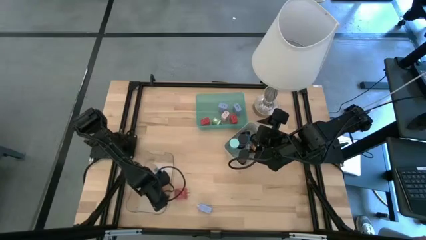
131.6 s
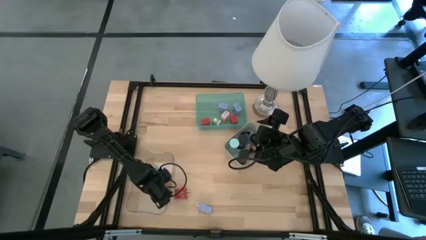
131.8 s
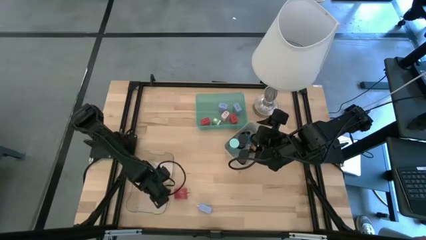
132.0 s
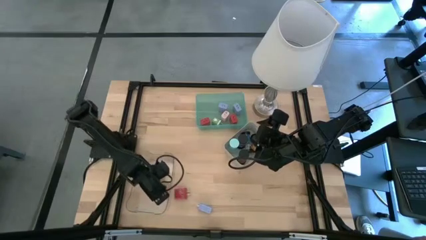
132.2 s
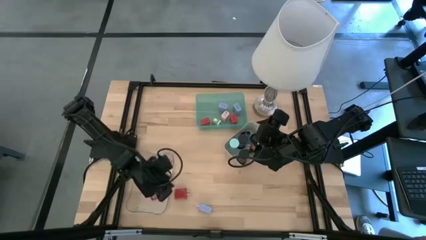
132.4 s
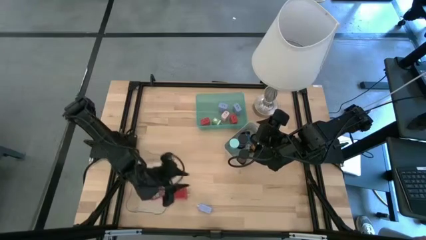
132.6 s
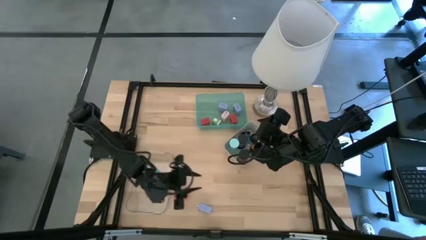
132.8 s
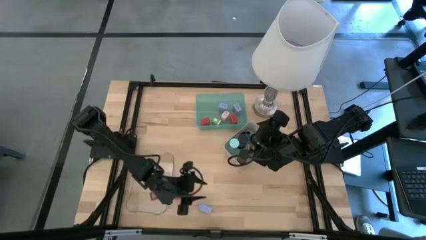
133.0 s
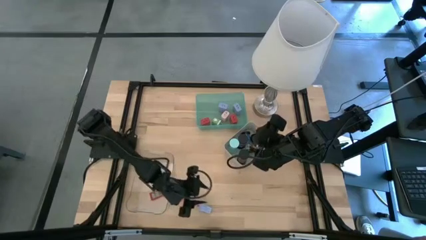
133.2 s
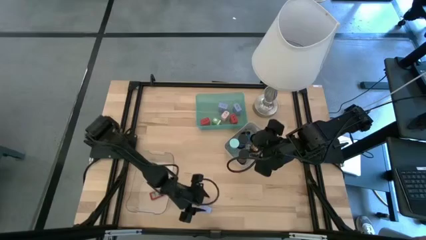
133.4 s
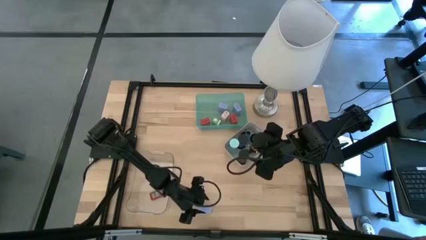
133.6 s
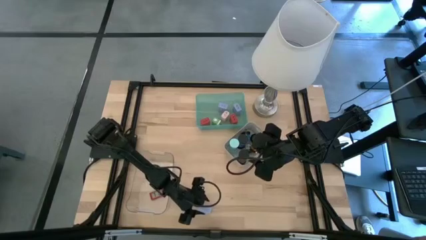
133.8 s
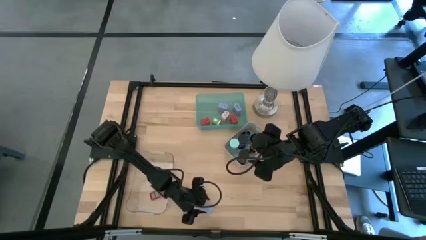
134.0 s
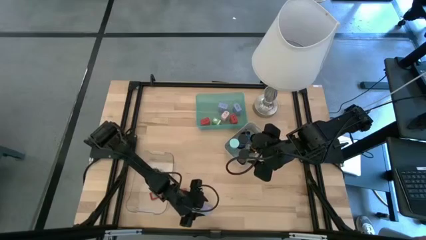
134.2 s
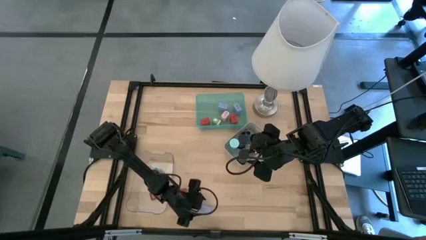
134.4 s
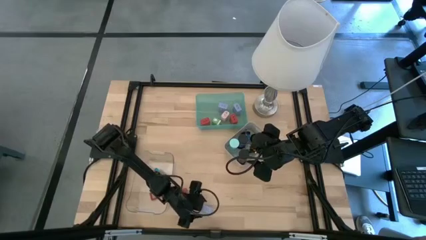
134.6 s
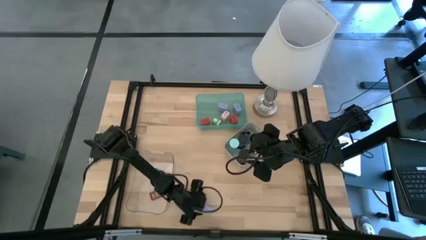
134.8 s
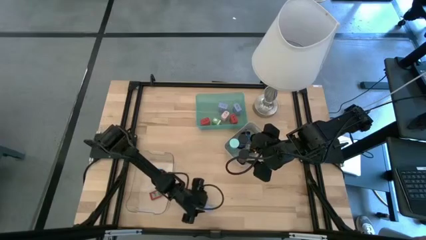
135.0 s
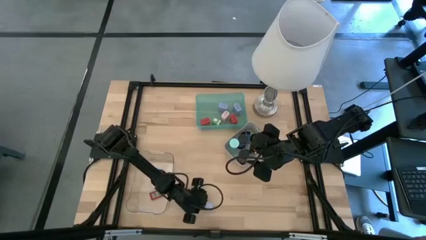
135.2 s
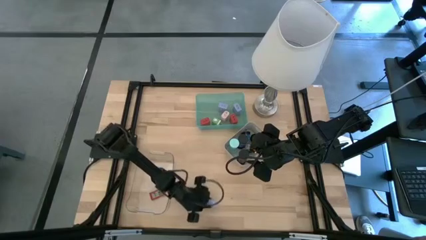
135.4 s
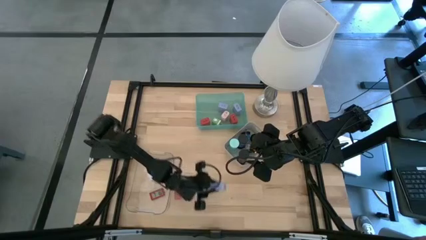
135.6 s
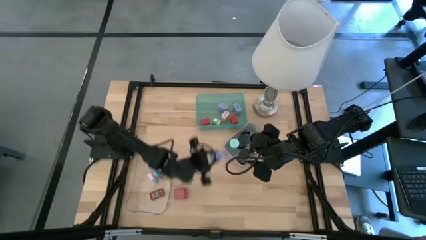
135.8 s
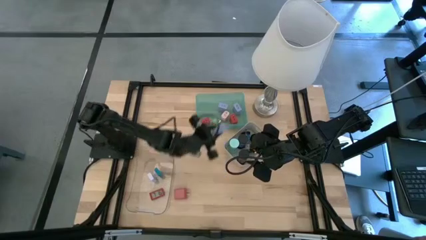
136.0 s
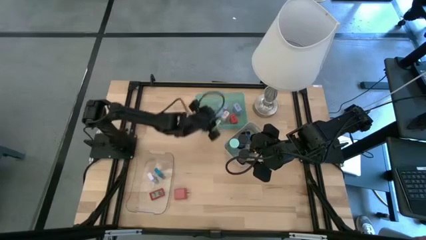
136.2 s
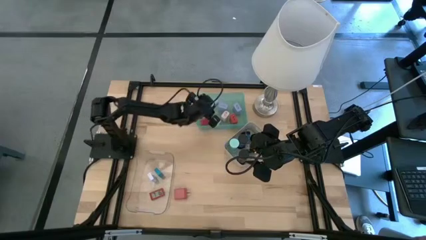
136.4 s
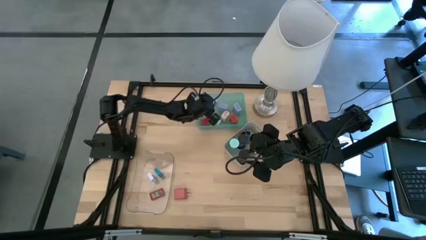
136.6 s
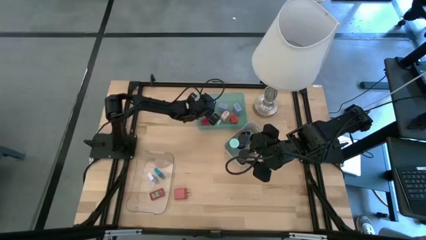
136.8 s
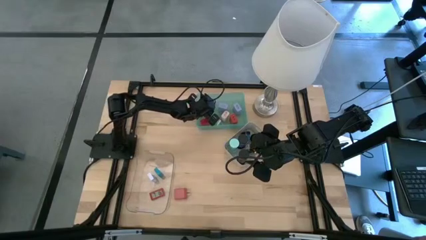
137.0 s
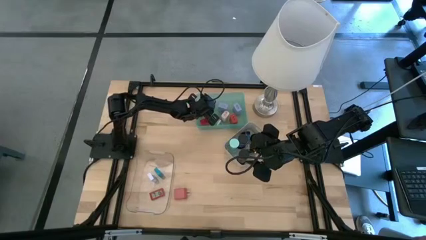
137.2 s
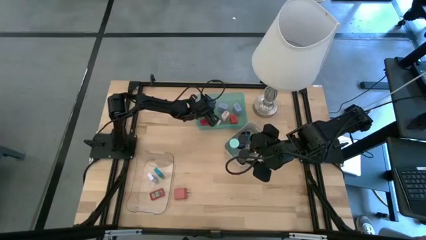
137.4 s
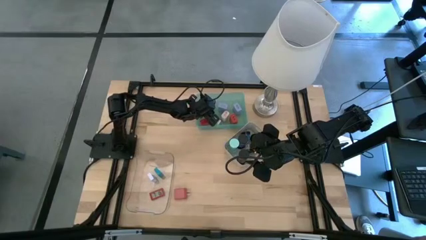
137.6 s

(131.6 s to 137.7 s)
Task: Pick & Place Office items
Put the light violet charger adapter into the green bin

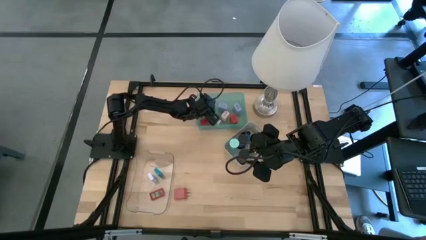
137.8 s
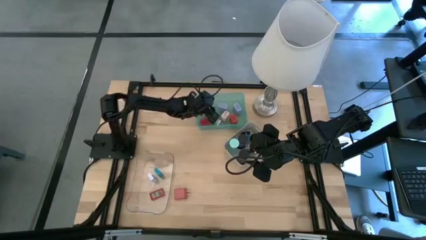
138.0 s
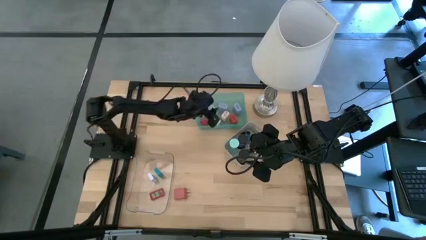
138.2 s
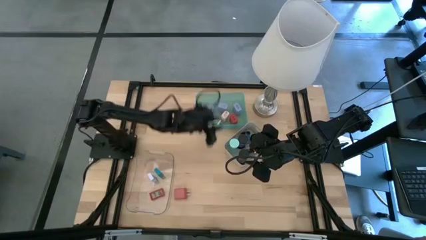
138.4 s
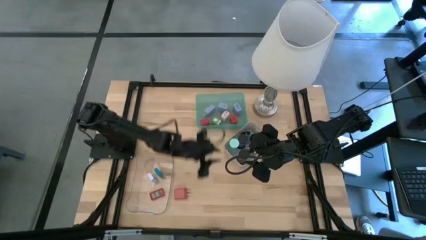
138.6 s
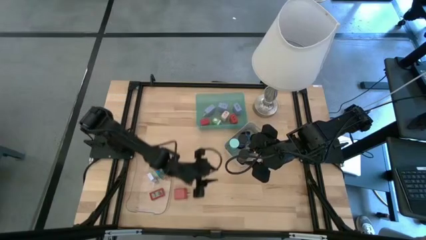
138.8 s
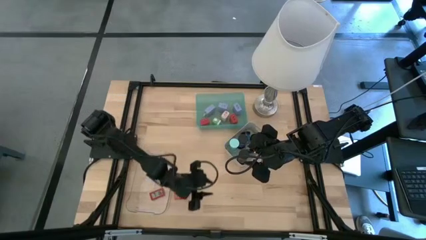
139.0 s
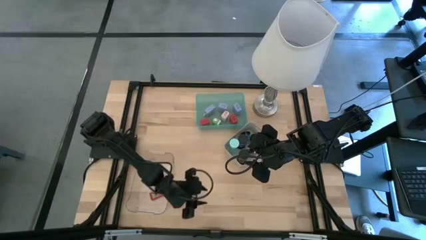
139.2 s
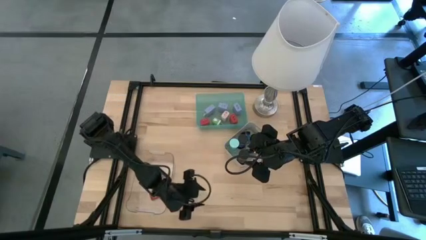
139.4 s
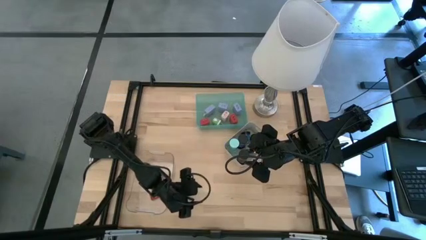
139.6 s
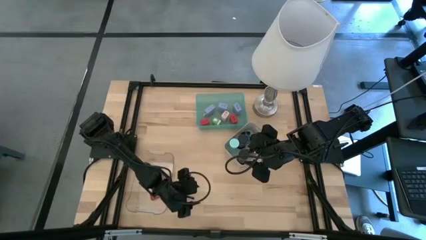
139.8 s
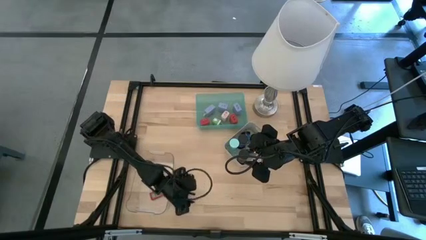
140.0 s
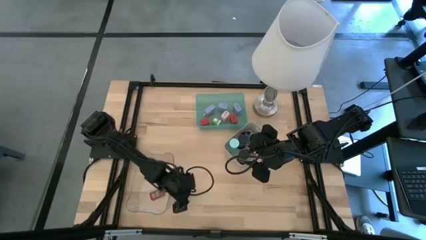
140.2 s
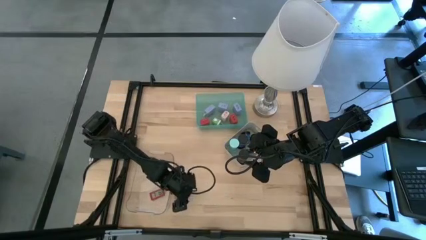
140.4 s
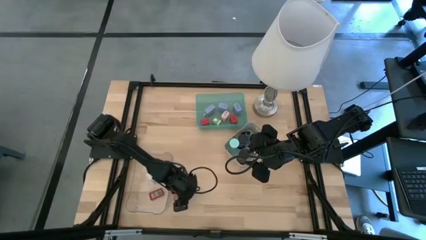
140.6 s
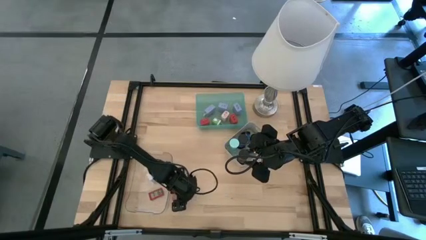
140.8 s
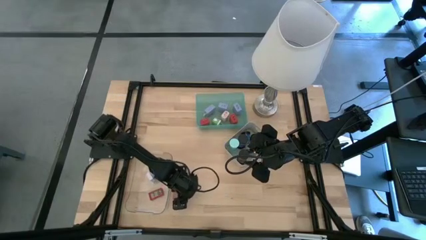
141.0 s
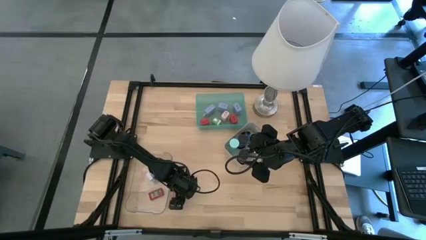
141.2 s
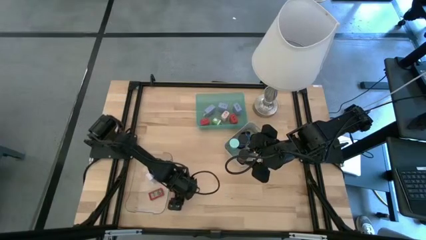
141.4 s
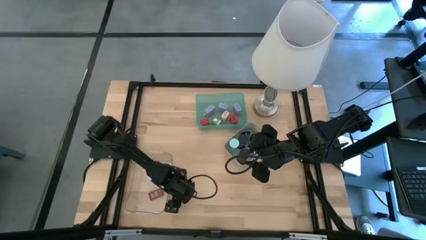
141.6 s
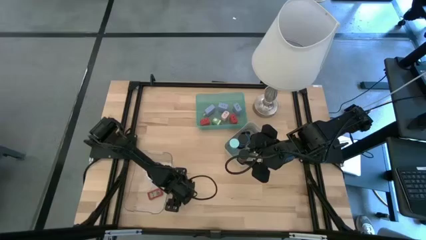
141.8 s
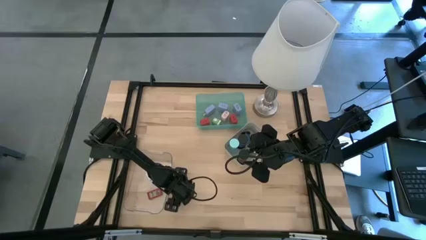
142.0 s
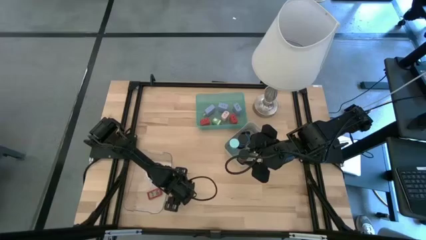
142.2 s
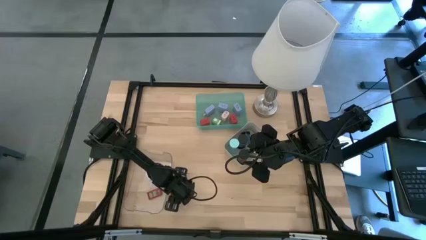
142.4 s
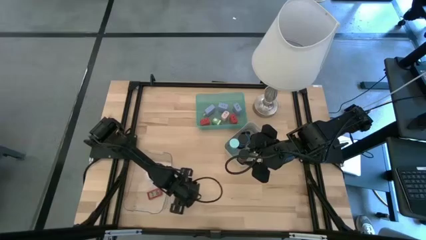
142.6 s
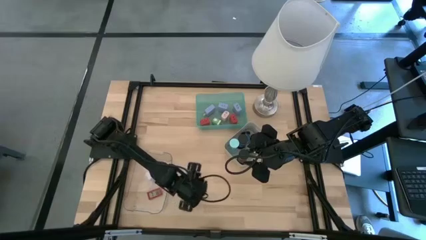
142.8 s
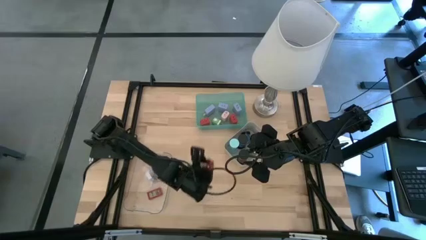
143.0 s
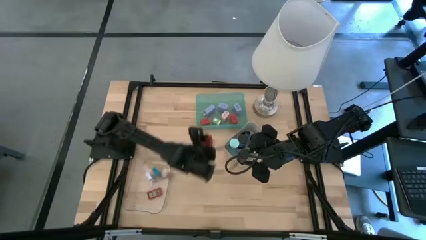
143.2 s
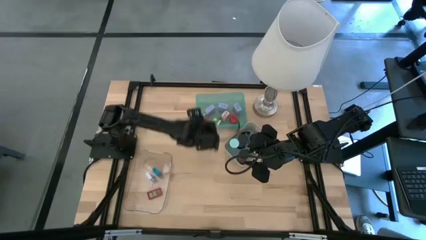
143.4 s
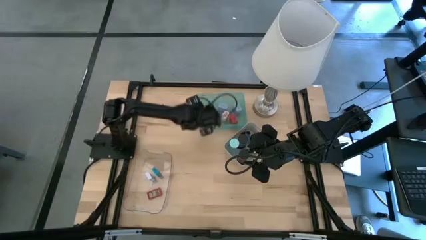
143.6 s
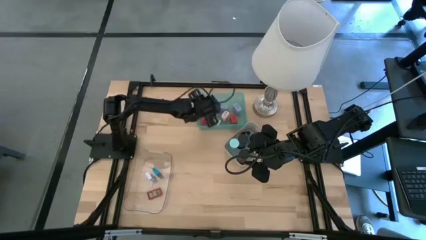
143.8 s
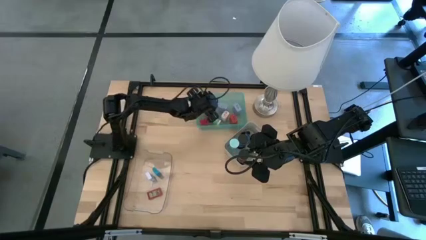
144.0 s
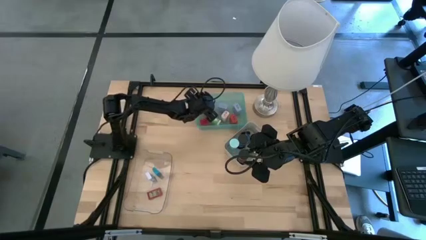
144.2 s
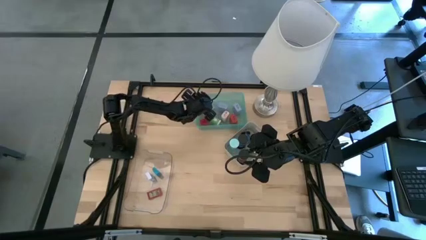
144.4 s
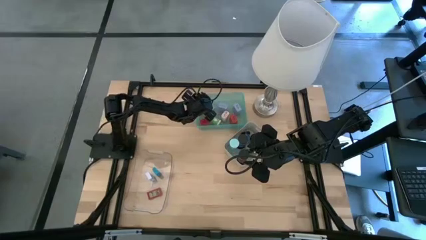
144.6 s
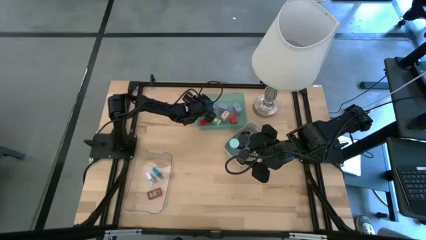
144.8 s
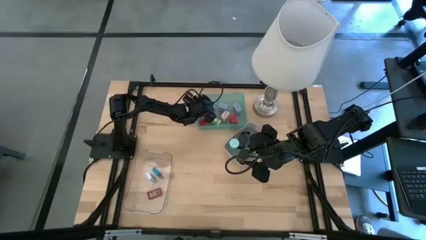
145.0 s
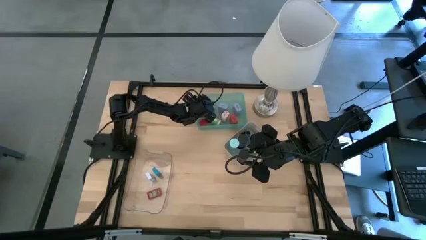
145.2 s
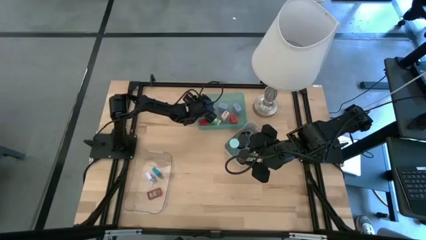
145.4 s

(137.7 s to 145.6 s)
Put the red charger adapter into the green bin
